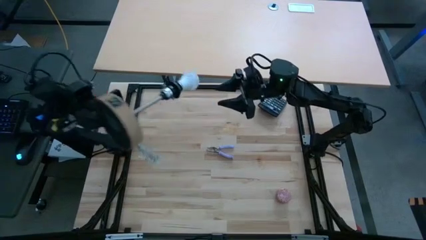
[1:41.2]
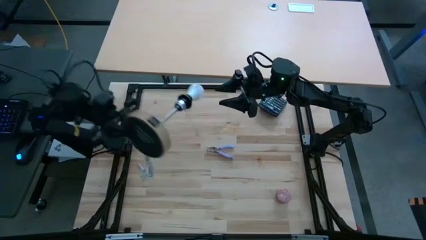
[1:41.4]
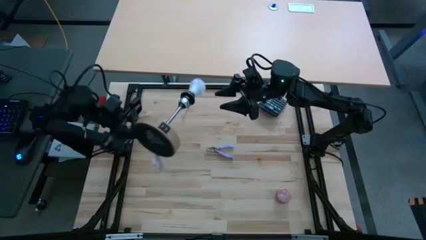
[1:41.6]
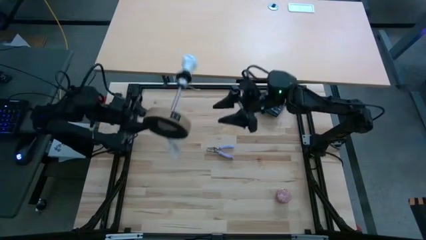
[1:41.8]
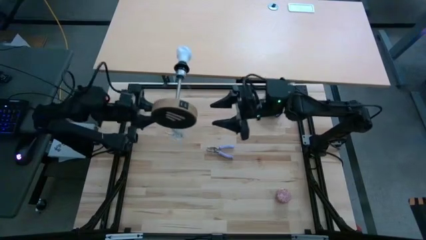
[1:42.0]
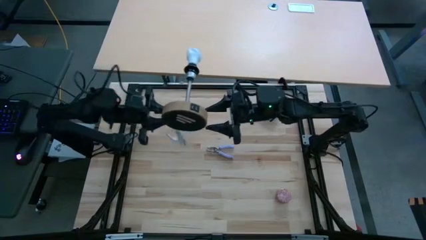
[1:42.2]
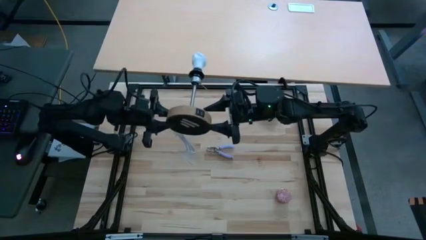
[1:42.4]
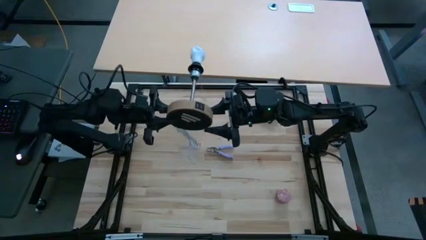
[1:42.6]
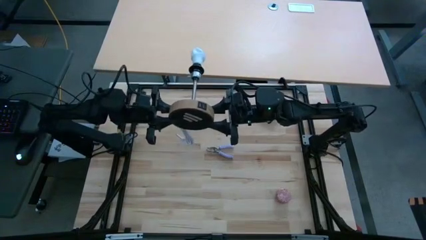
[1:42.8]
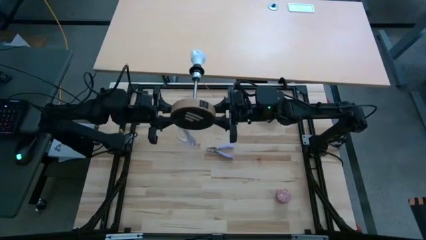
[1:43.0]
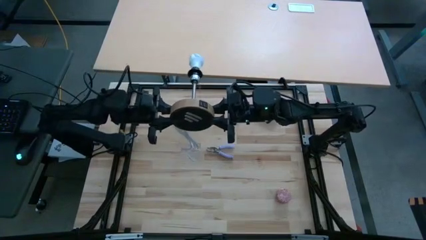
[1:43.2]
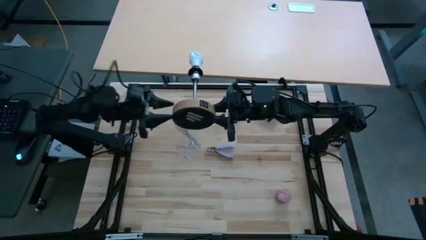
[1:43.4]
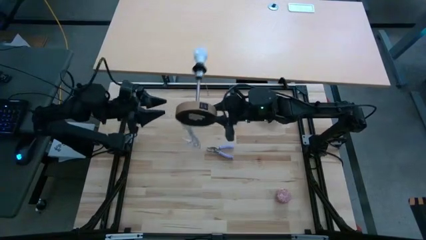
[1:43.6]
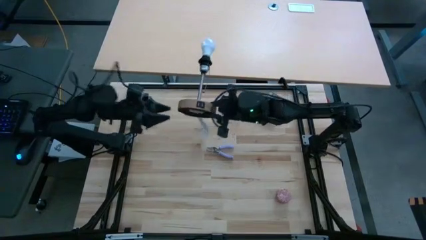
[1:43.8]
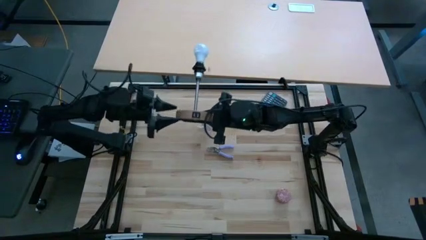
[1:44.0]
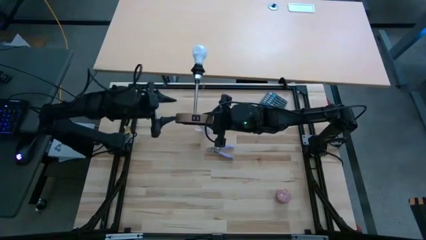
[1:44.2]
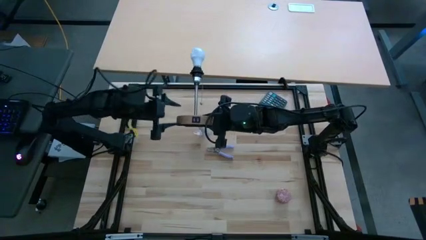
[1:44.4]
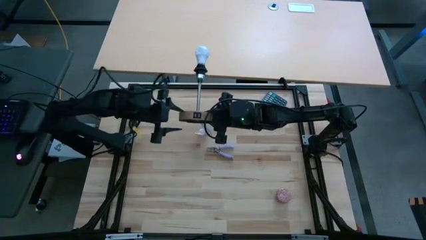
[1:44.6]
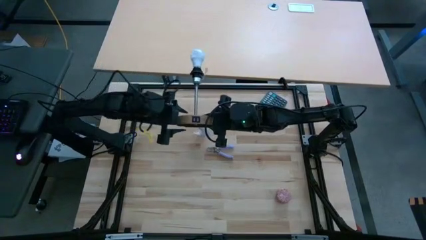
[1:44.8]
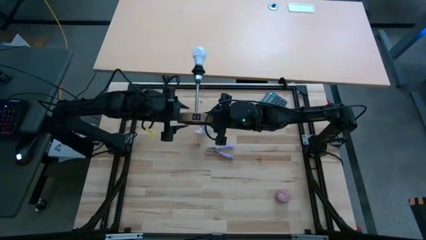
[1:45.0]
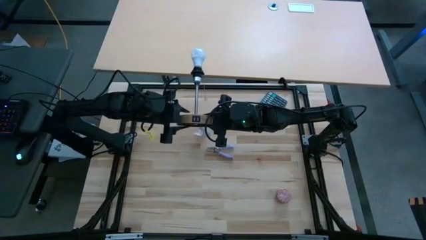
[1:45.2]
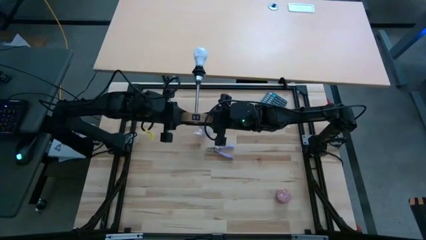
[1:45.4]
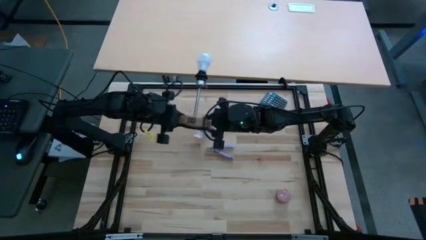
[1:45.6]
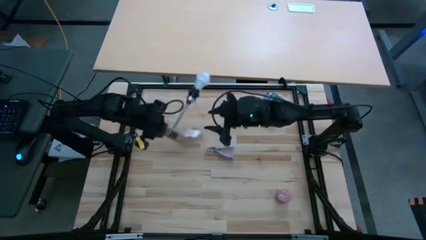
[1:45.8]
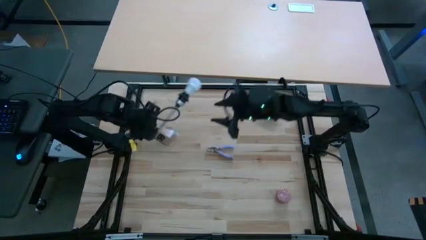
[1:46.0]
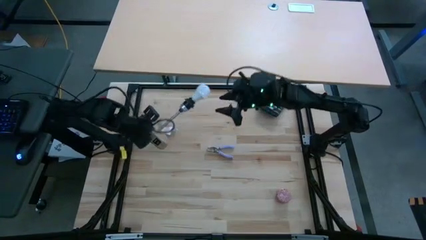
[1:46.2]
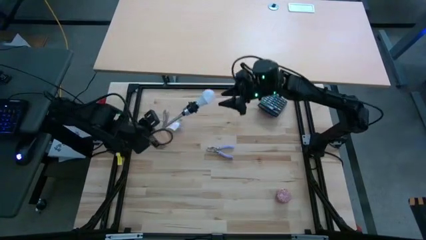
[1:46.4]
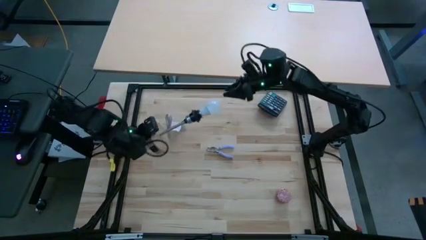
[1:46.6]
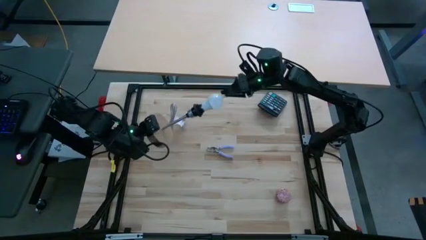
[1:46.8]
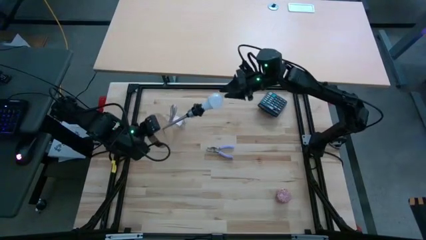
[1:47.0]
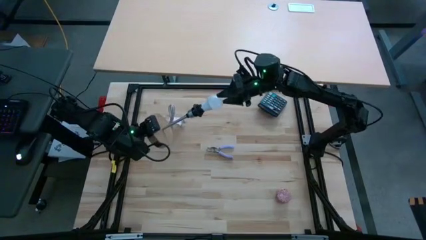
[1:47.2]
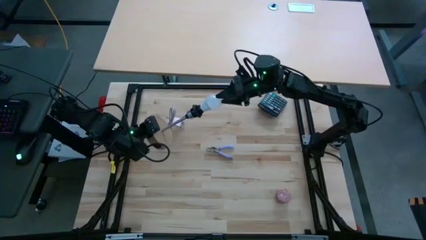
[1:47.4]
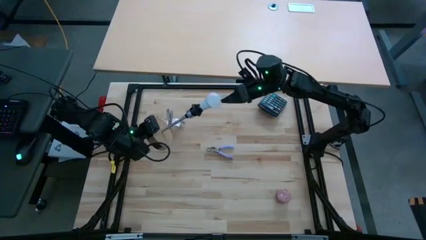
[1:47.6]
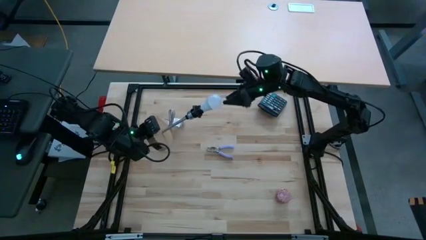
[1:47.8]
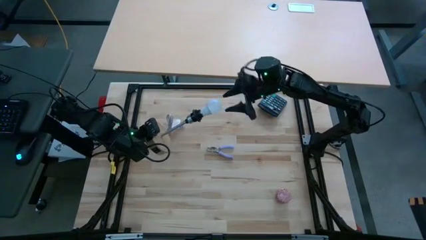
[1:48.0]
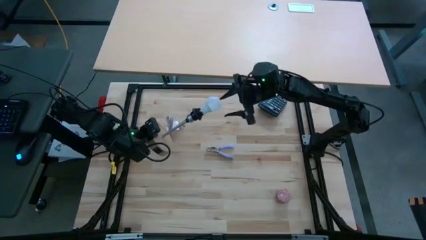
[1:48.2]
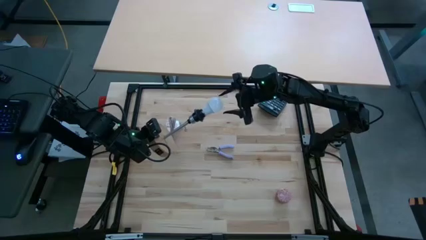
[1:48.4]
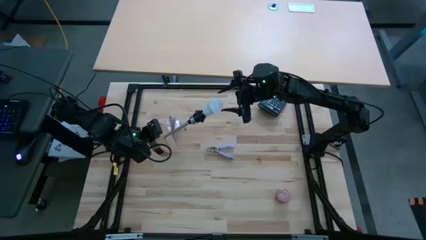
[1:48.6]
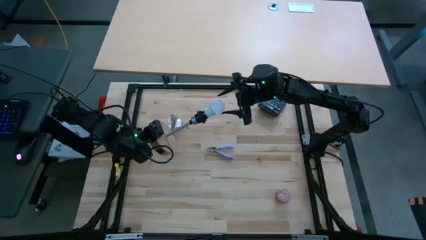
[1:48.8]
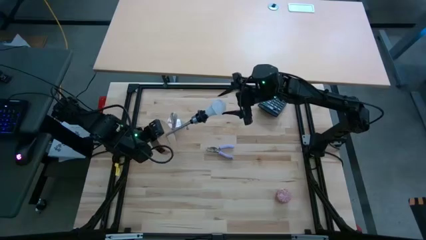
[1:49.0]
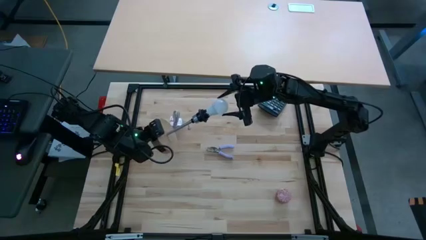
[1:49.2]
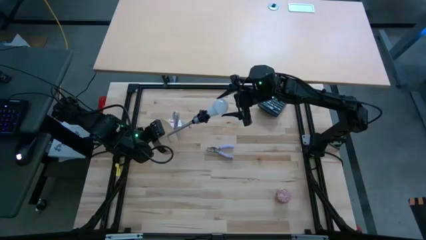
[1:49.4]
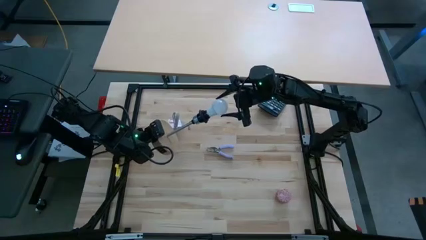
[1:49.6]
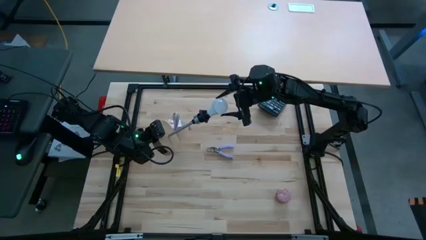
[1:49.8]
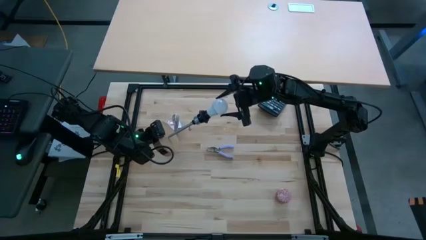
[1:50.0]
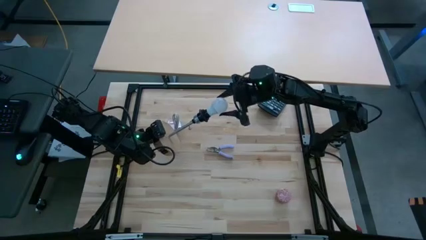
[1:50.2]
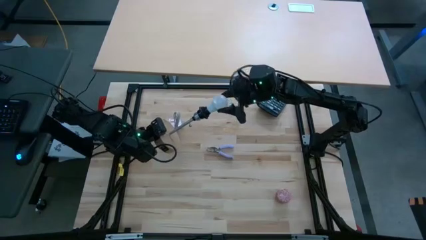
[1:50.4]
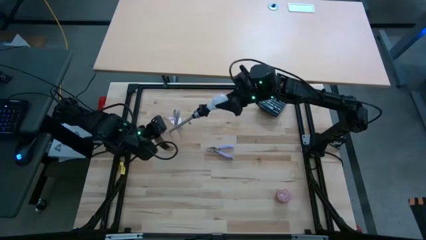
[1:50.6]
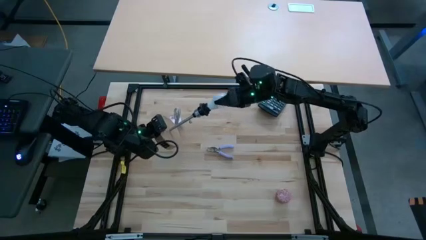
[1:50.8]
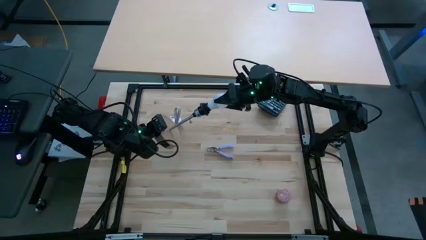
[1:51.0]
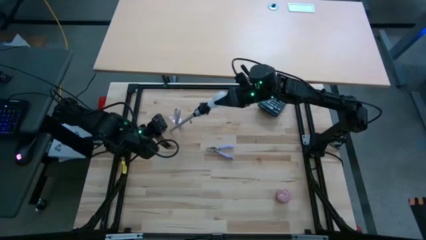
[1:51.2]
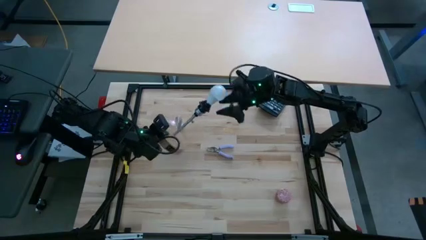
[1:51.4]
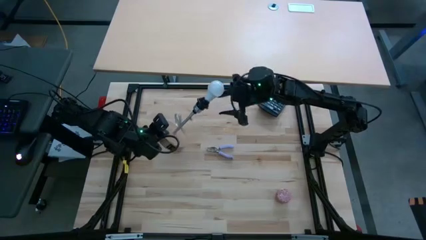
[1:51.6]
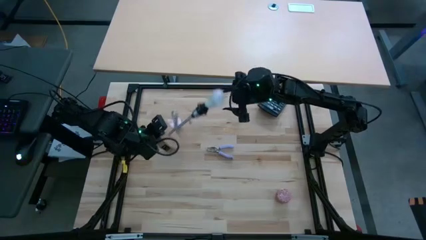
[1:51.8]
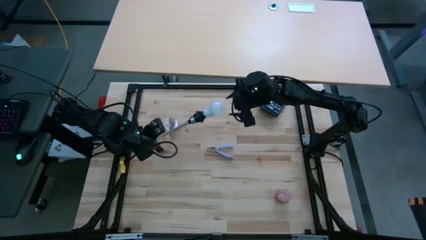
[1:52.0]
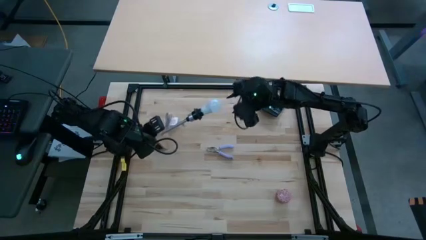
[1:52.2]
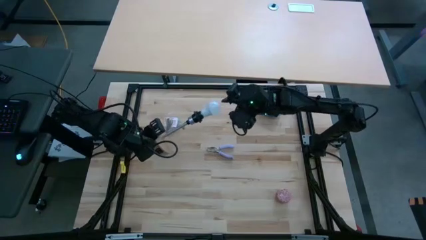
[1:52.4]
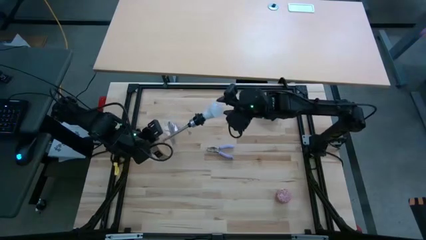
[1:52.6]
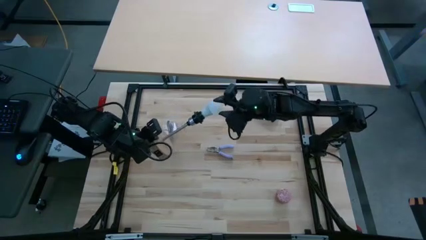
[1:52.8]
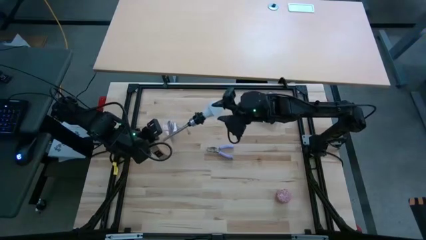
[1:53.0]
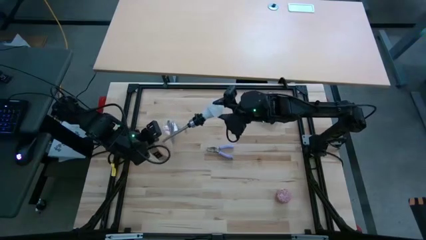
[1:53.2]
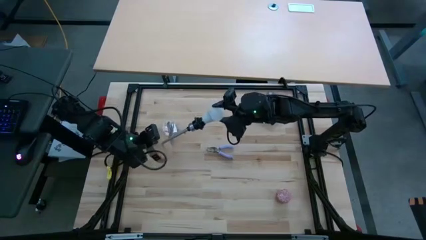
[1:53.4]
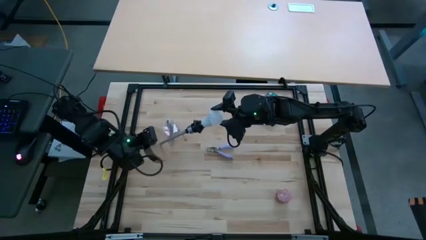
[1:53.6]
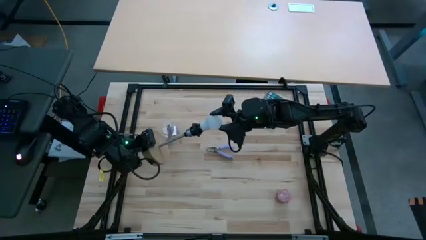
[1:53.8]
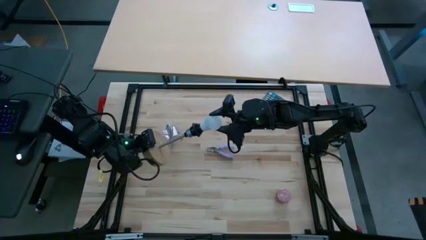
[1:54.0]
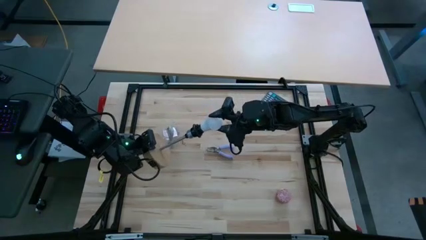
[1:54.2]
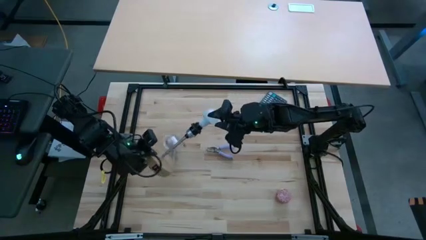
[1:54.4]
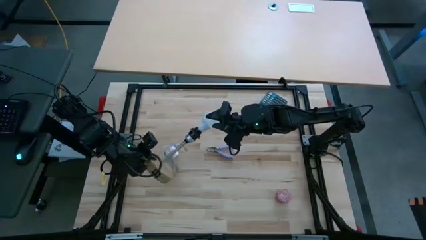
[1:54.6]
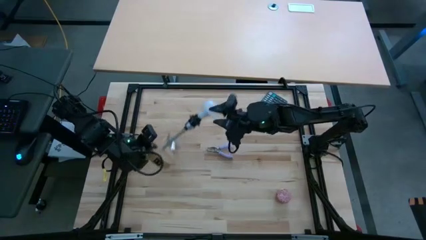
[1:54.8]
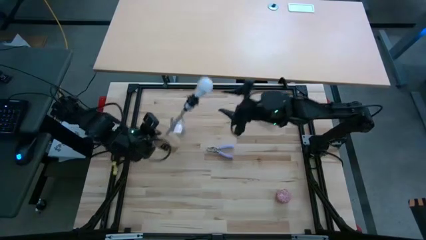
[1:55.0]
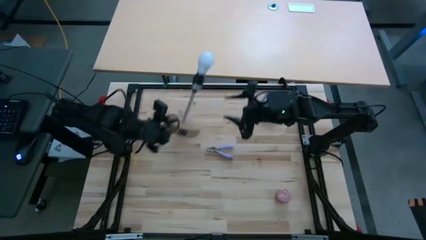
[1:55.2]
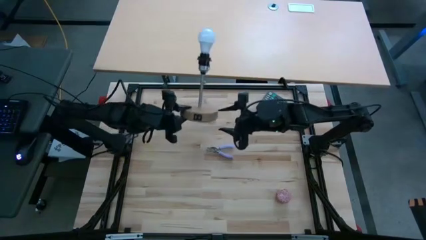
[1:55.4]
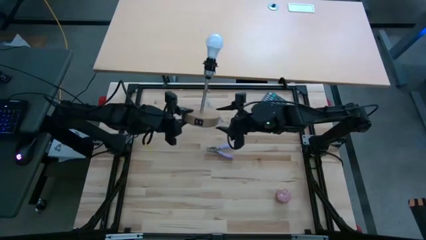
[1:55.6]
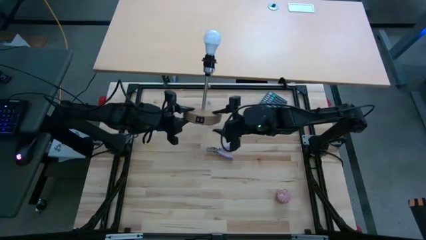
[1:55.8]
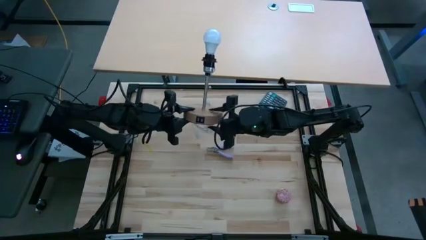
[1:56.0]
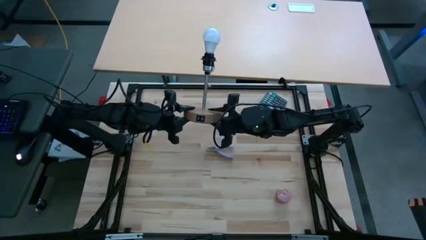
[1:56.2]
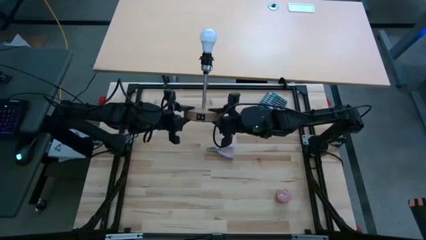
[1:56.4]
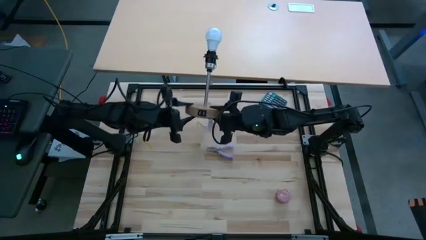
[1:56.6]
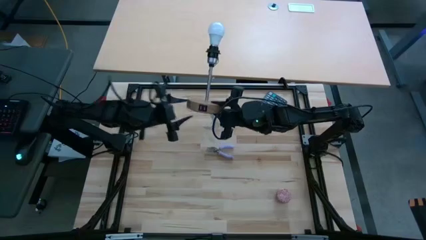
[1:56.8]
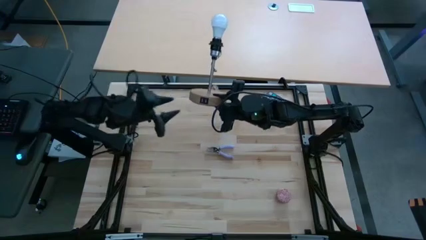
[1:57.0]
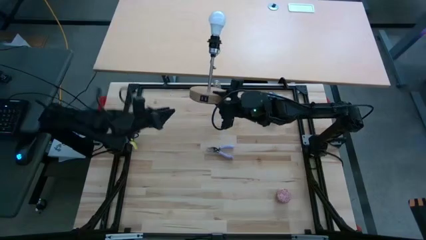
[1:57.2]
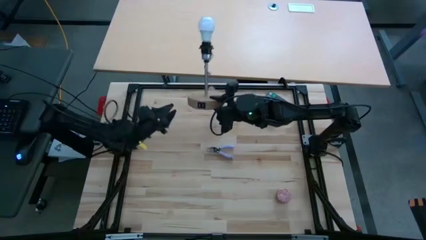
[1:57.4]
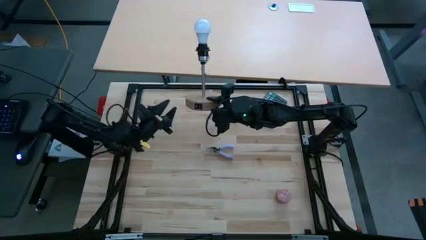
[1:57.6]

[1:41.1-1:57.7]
Task: Screw lightbulb
Remove the light bulb from the lamp socket
